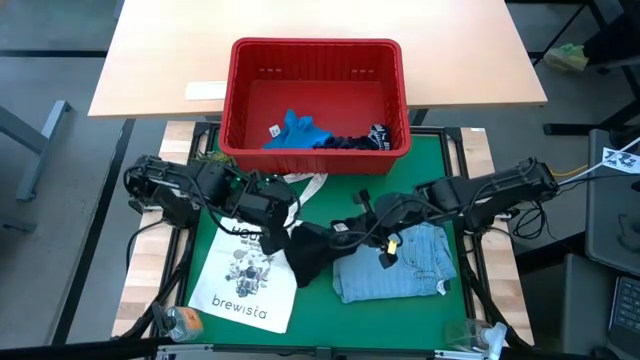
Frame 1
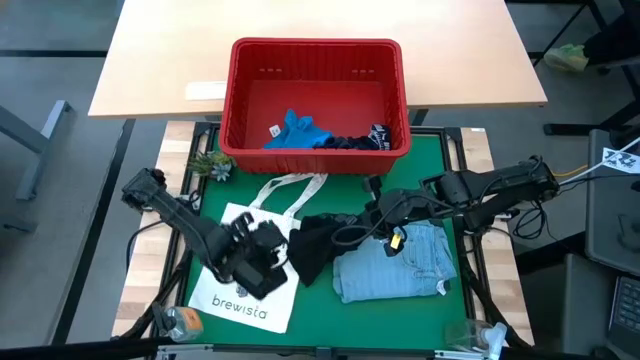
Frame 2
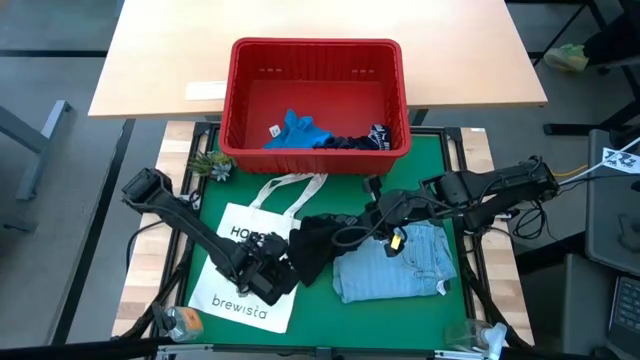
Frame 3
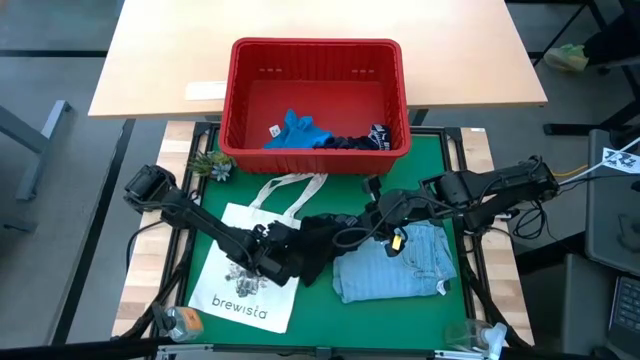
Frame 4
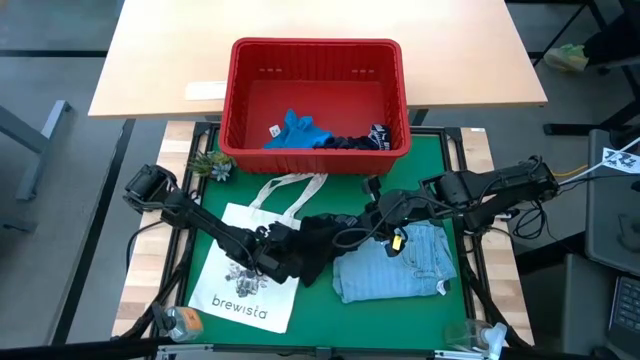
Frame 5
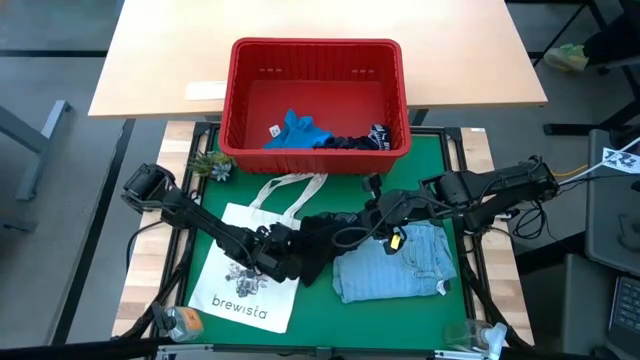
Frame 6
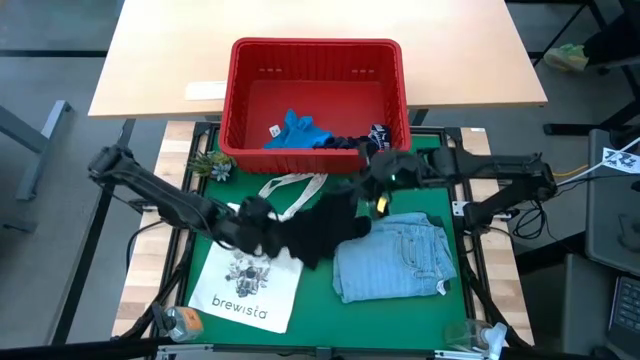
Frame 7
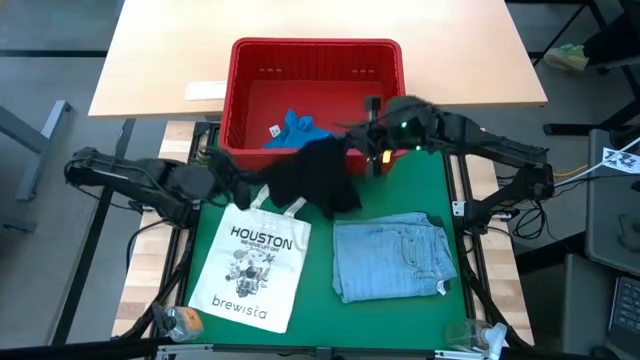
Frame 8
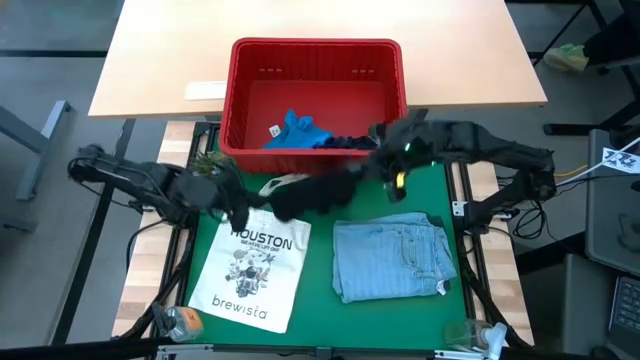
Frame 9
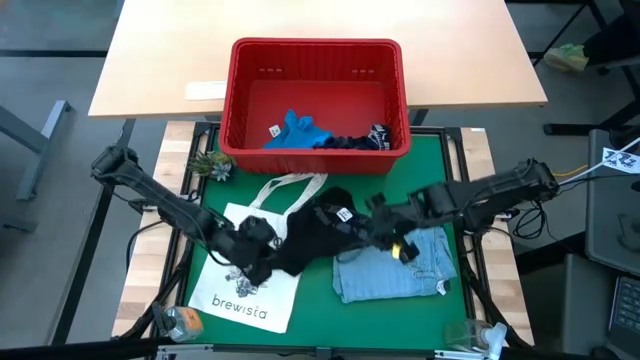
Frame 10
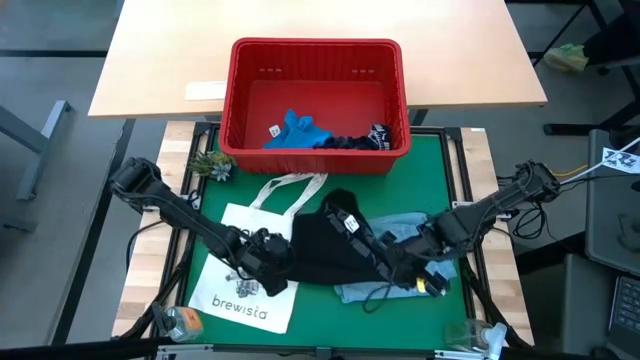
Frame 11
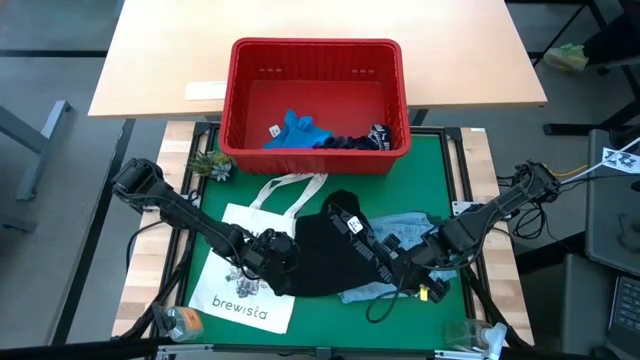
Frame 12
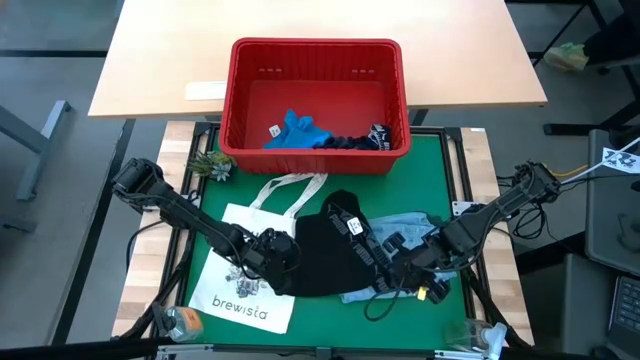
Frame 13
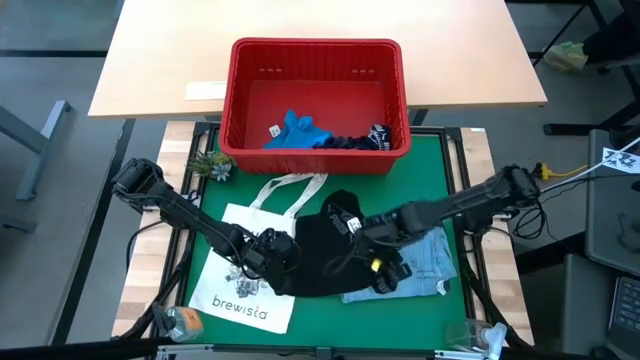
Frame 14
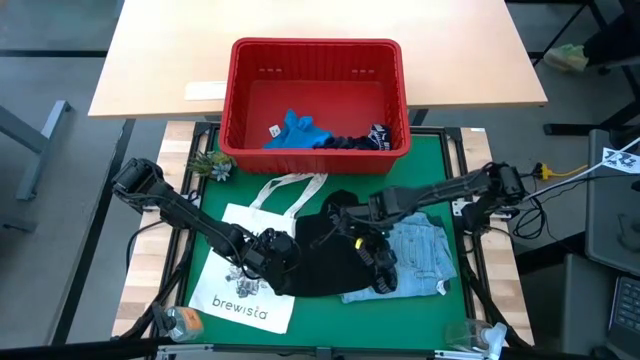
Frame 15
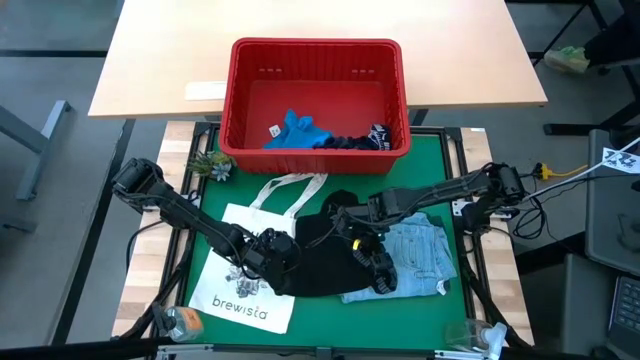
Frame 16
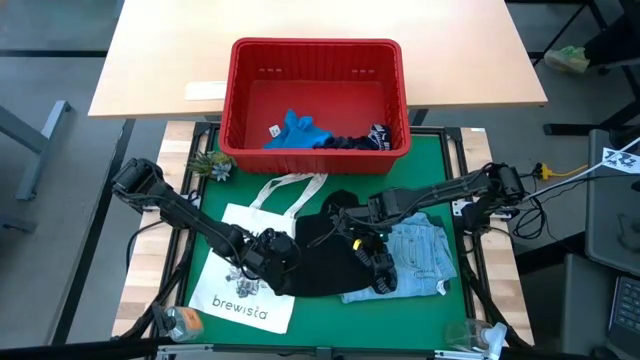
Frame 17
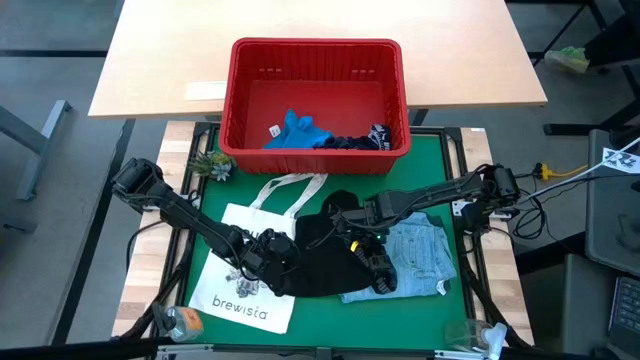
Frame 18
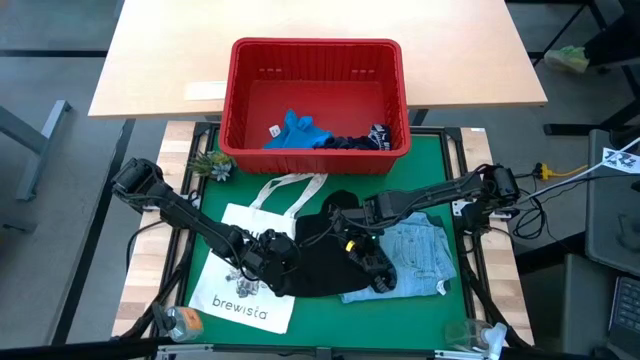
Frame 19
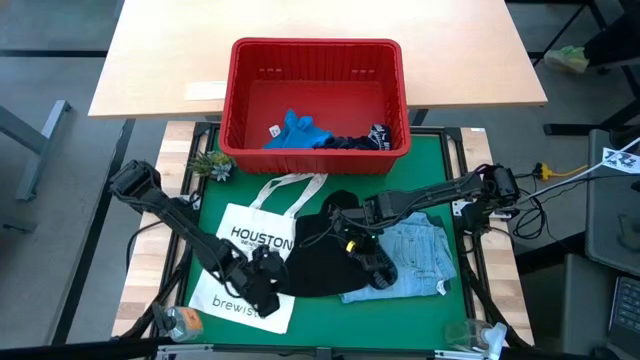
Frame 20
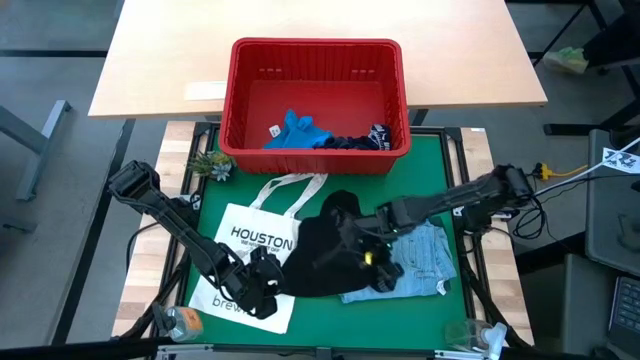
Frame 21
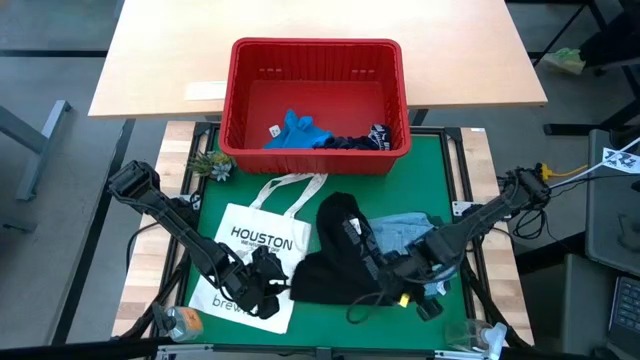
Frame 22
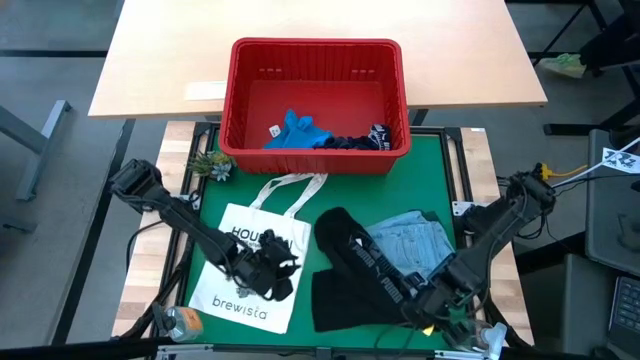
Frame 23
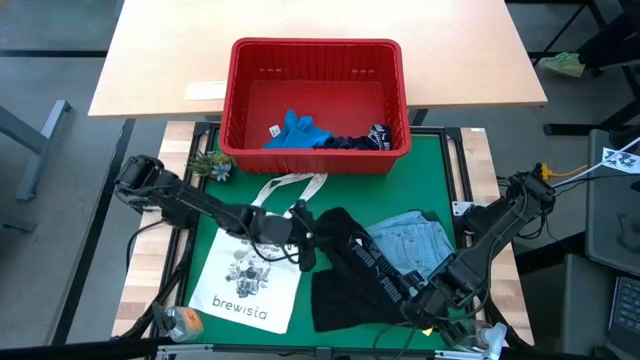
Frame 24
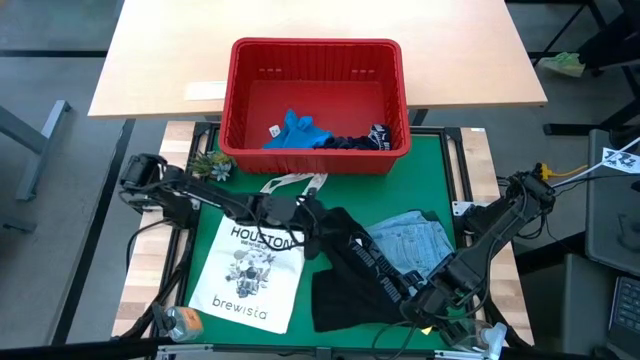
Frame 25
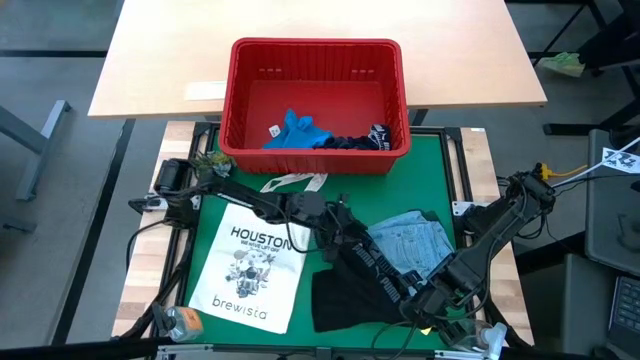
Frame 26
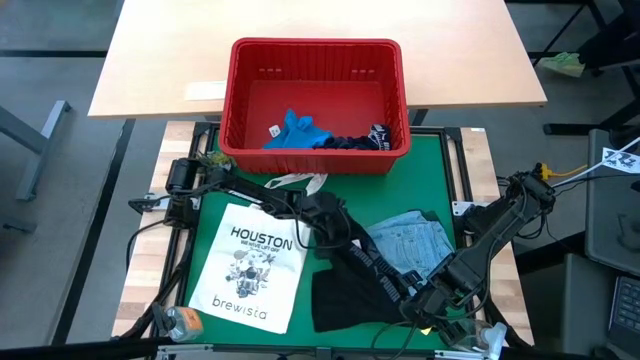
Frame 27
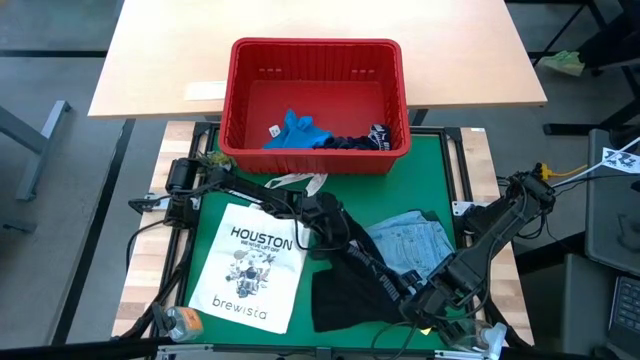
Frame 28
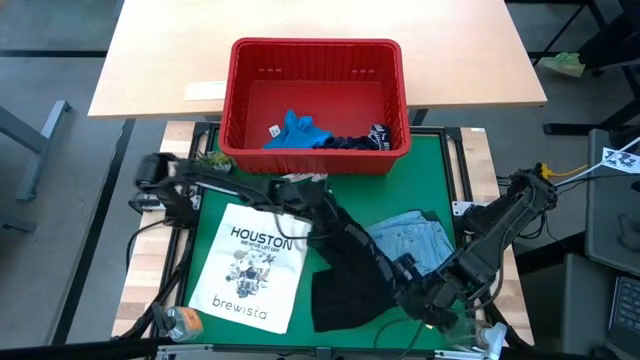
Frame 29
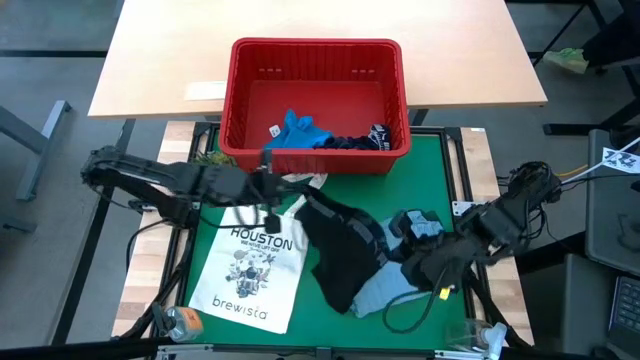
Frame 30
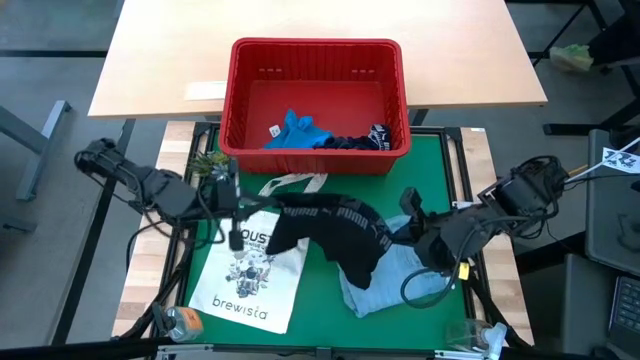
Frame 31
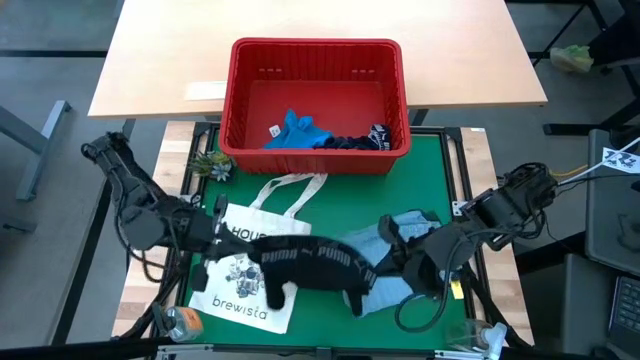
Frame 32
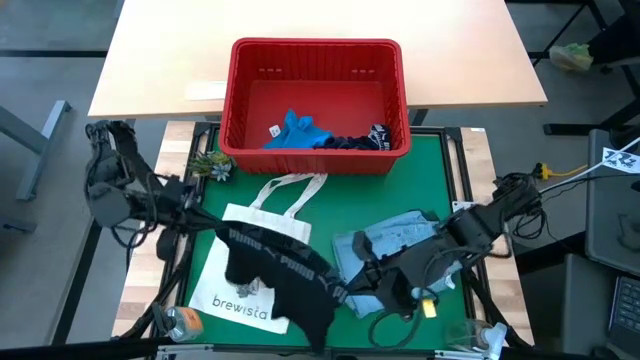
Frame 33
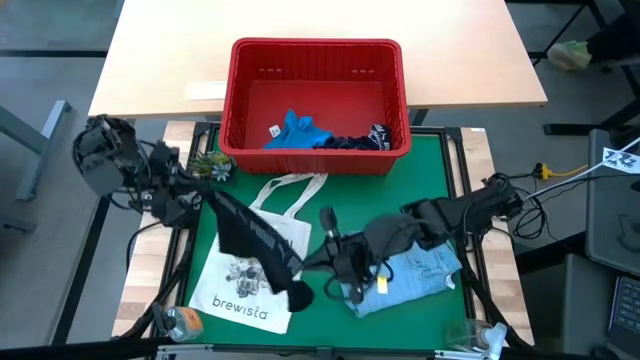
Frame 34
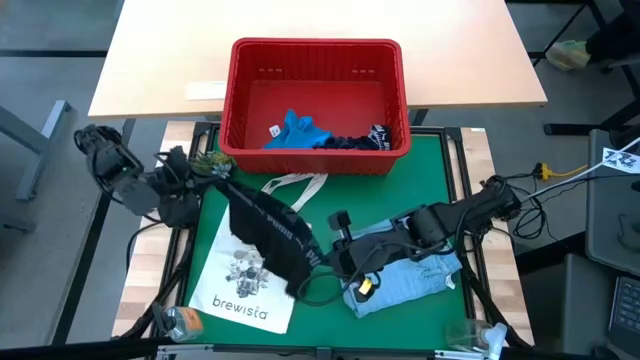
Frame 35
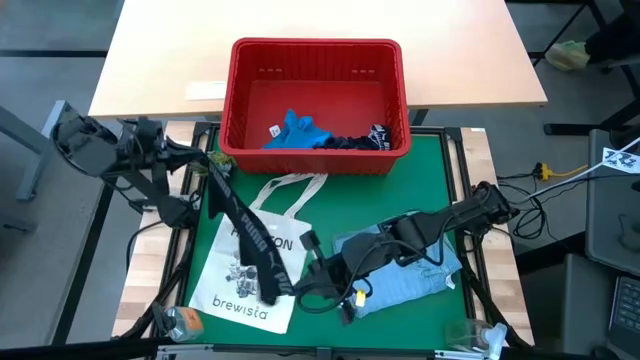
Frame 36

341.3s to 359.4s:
Task: Fold Laundry from Bin
Fold the black boxer

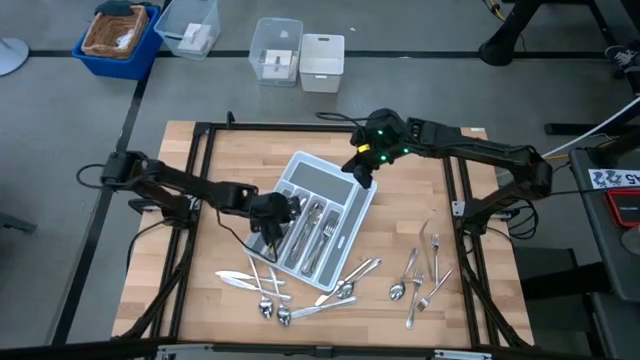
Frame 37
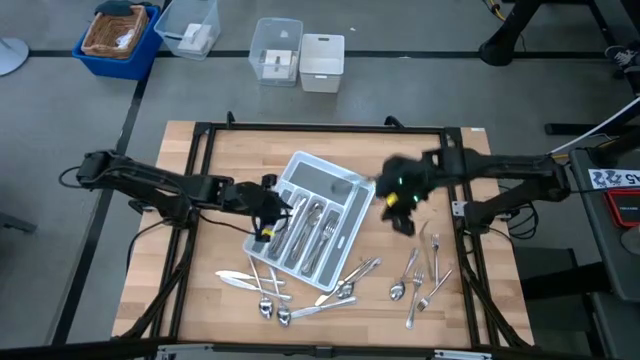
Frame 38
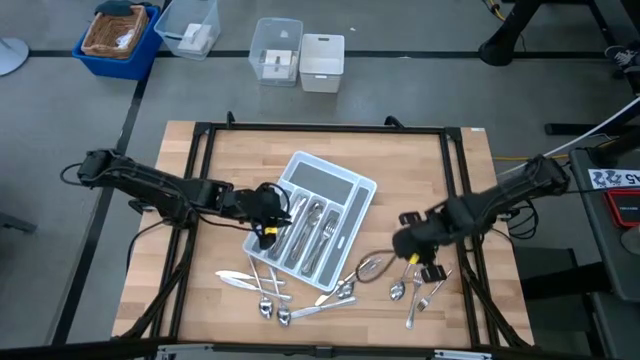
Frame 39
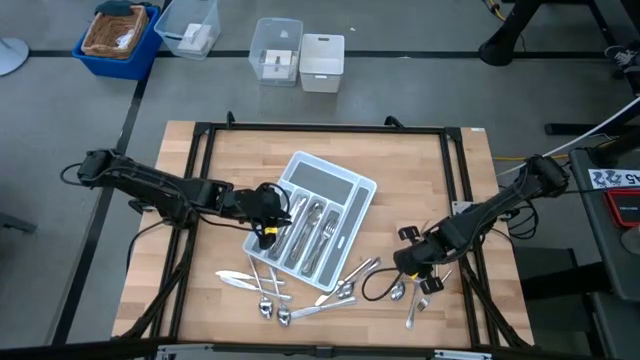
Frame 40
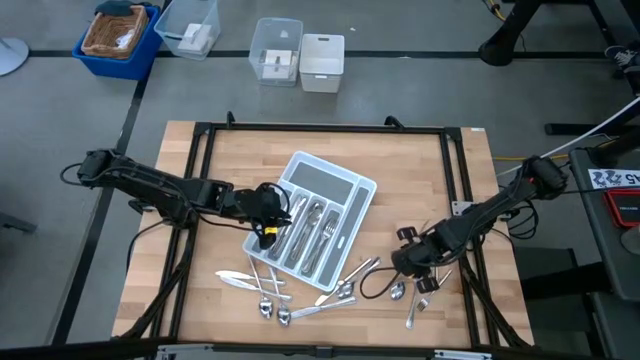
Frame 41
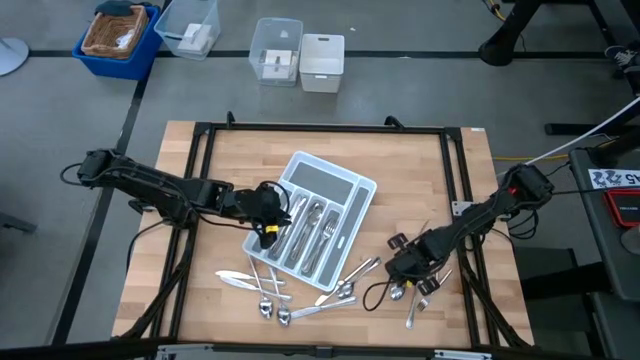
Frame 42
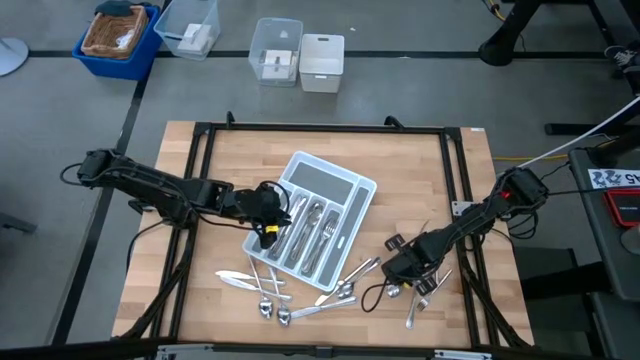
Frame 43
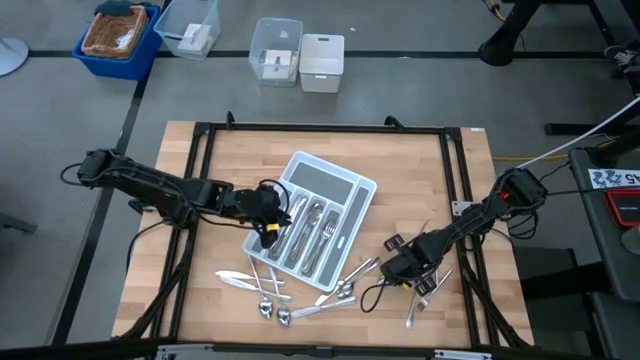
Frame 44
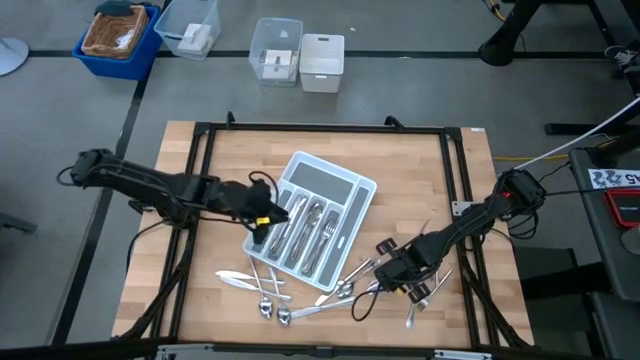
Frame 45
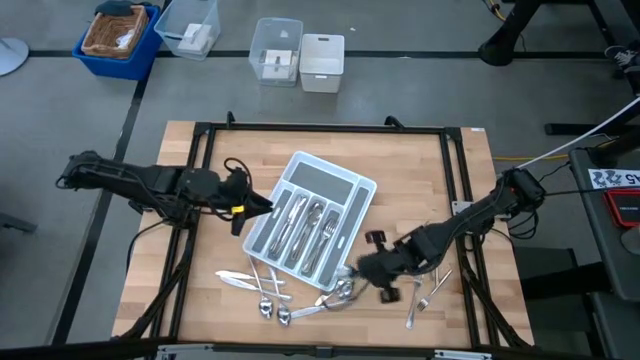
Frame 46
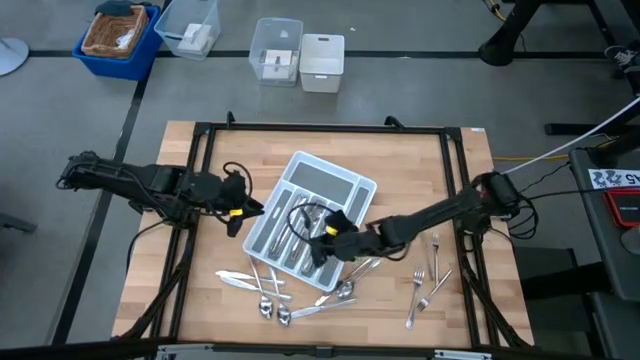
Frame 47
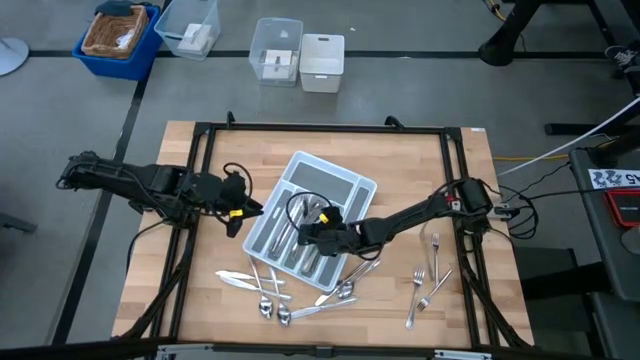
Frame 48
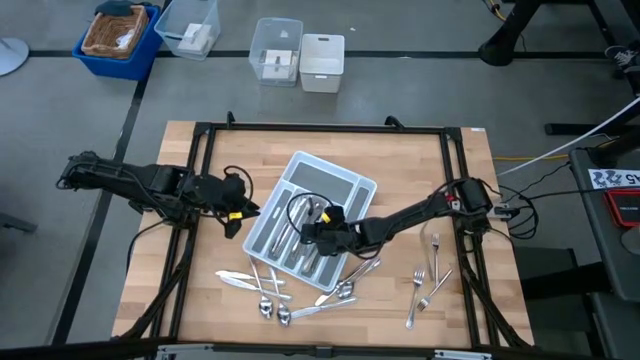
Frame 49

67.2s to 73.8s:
Task: Sort silverware
Put the silver spoon into the white cutlery tray
